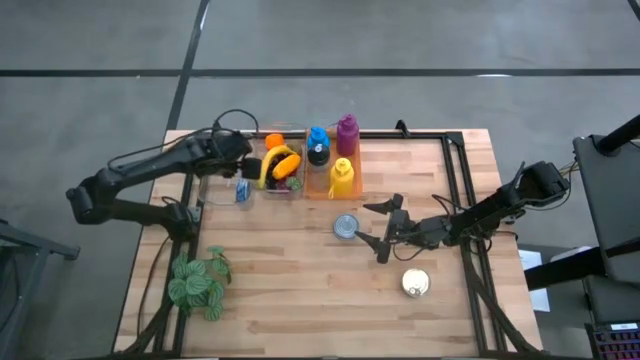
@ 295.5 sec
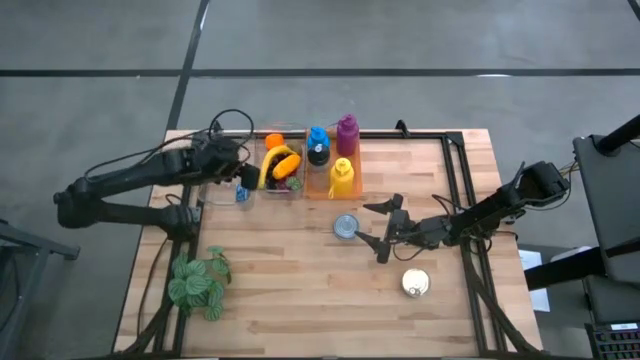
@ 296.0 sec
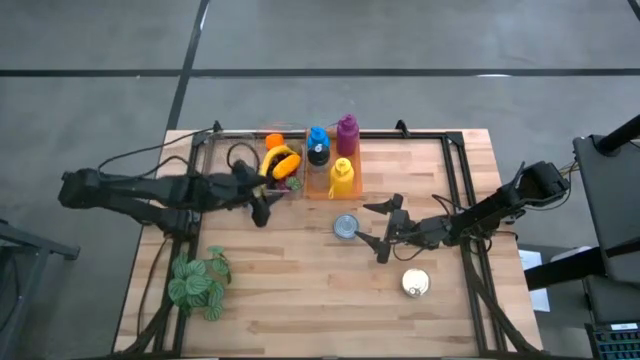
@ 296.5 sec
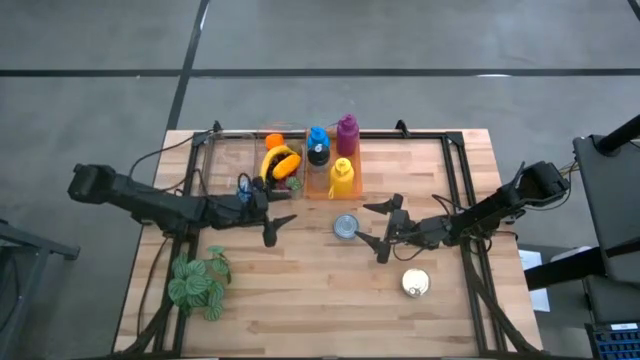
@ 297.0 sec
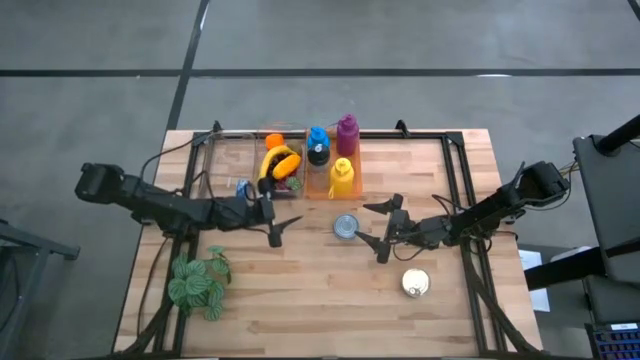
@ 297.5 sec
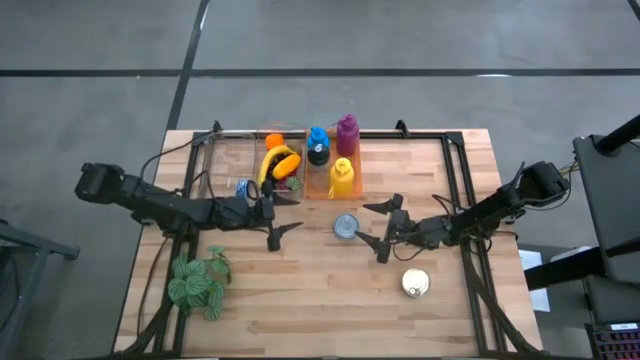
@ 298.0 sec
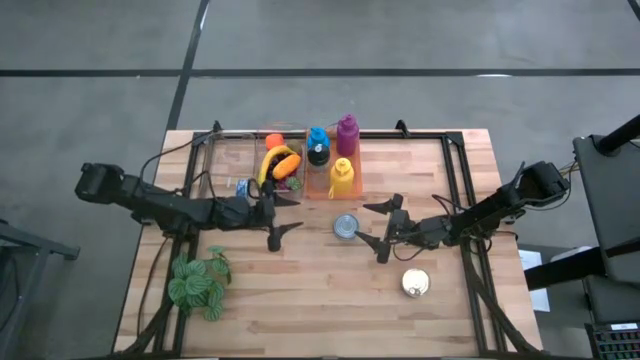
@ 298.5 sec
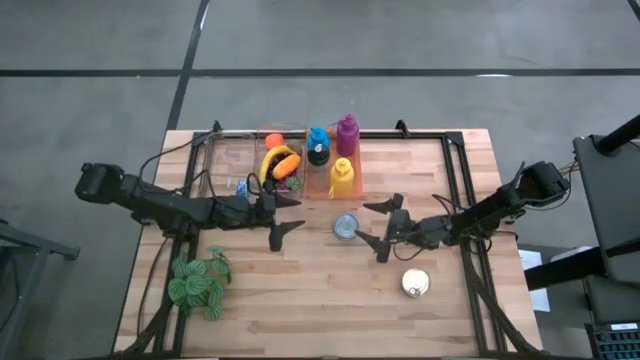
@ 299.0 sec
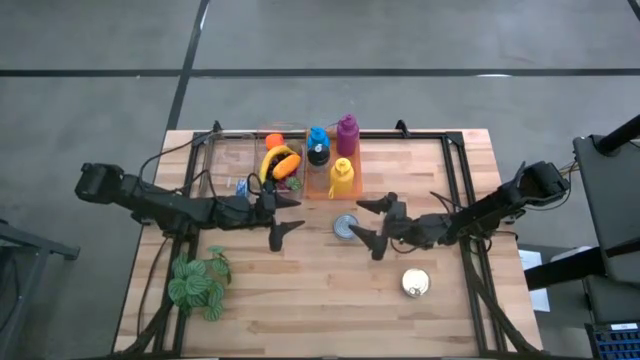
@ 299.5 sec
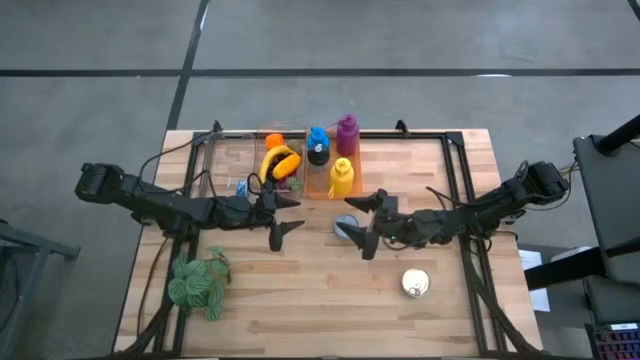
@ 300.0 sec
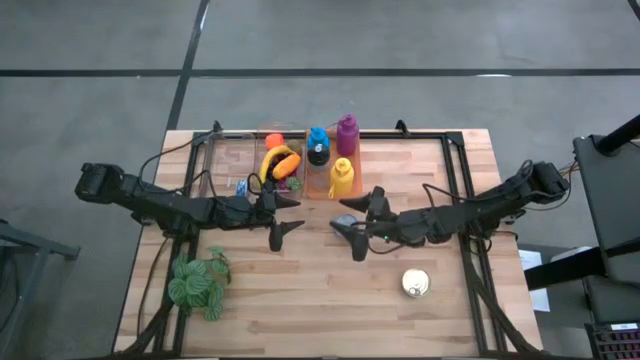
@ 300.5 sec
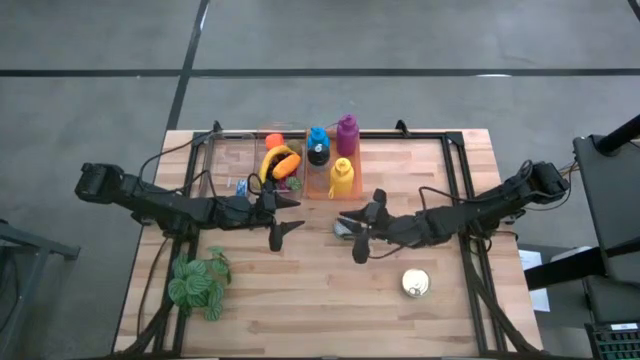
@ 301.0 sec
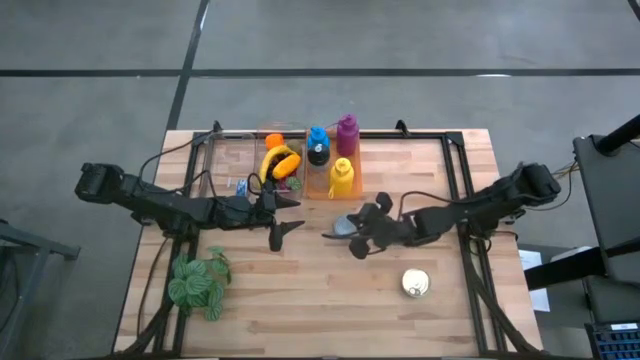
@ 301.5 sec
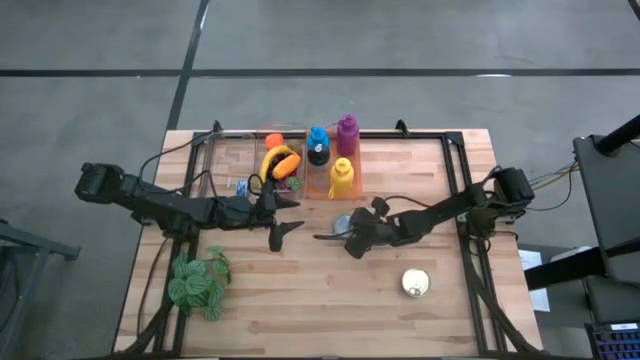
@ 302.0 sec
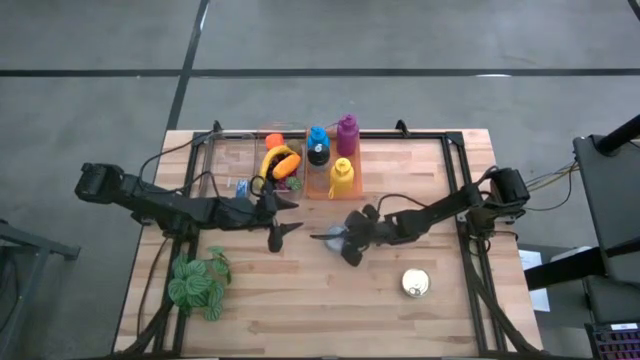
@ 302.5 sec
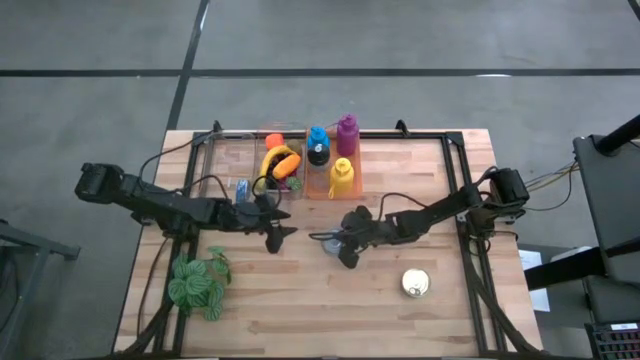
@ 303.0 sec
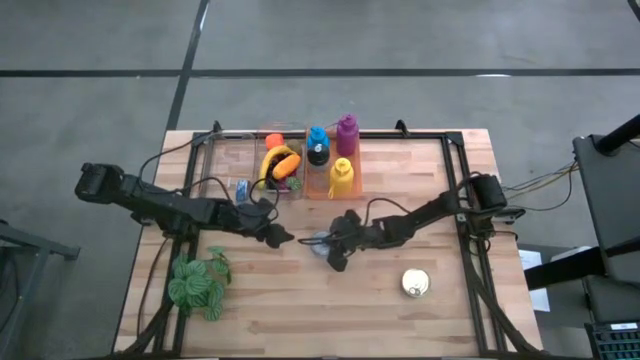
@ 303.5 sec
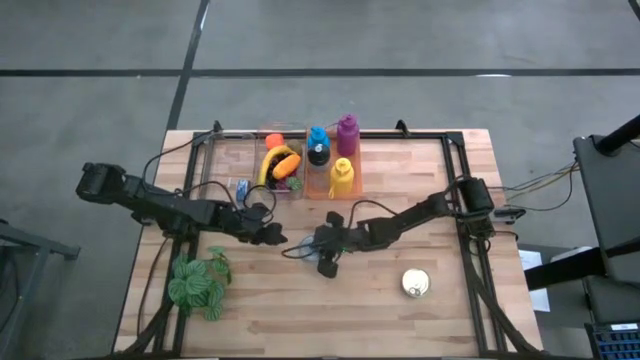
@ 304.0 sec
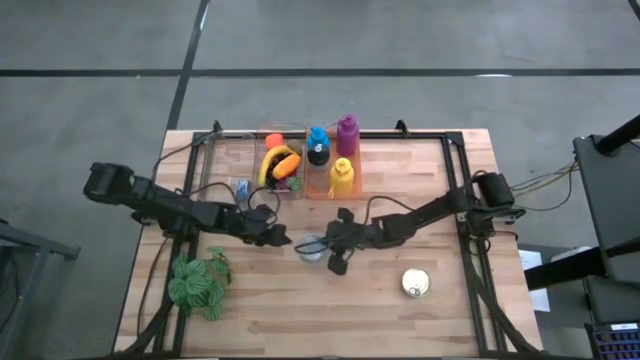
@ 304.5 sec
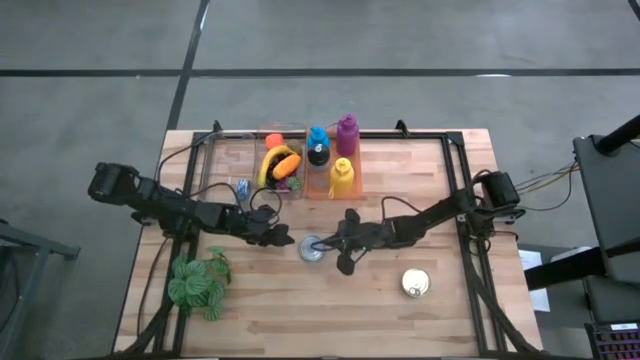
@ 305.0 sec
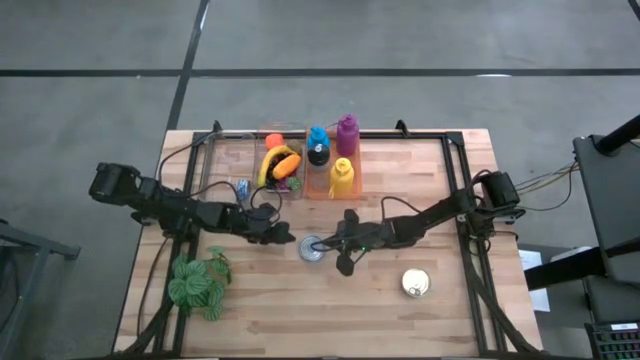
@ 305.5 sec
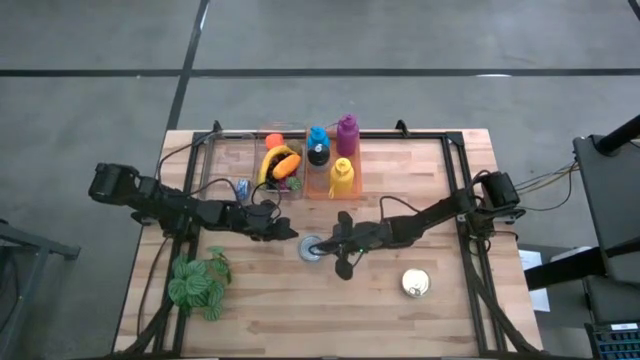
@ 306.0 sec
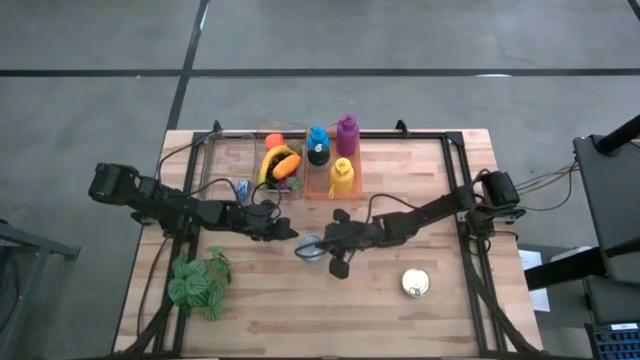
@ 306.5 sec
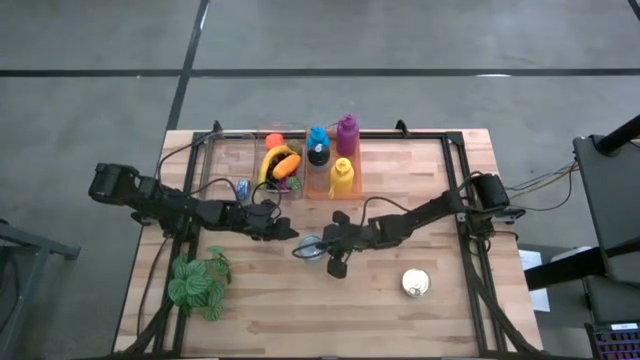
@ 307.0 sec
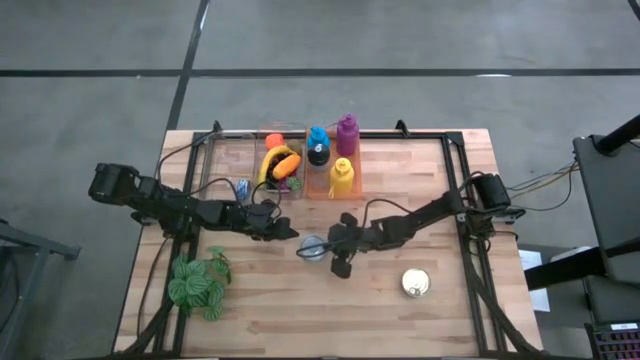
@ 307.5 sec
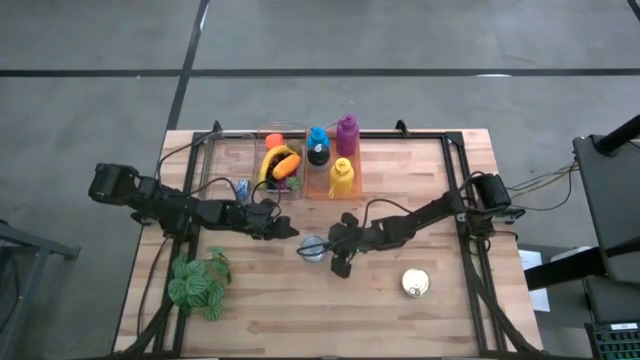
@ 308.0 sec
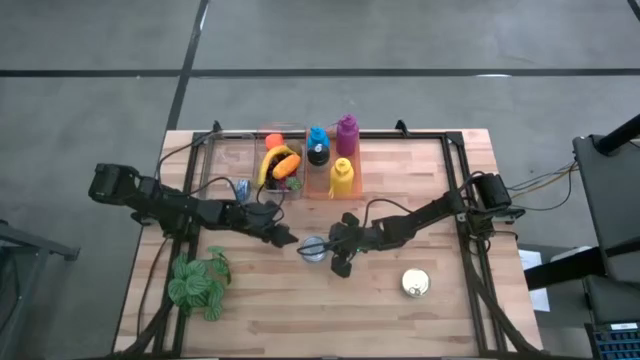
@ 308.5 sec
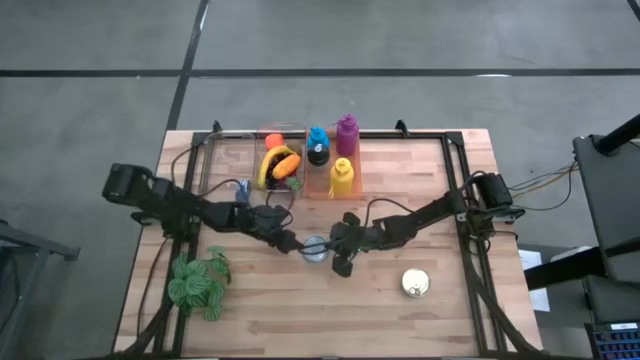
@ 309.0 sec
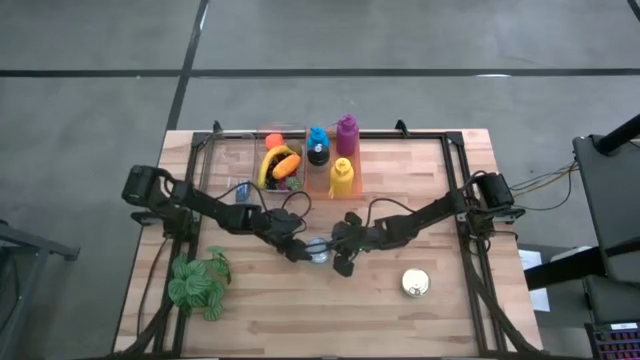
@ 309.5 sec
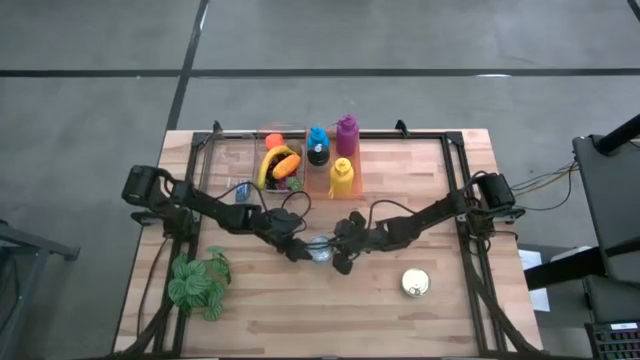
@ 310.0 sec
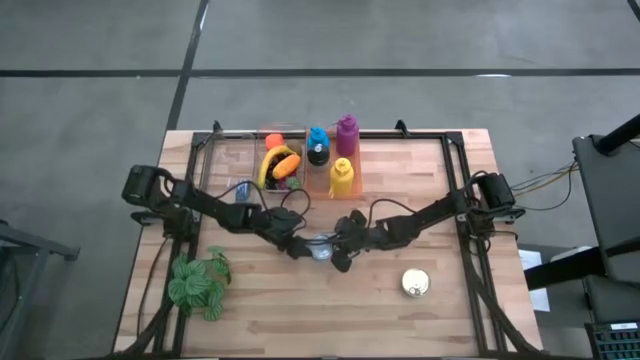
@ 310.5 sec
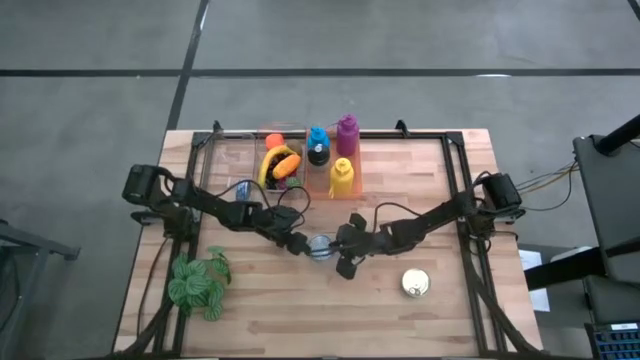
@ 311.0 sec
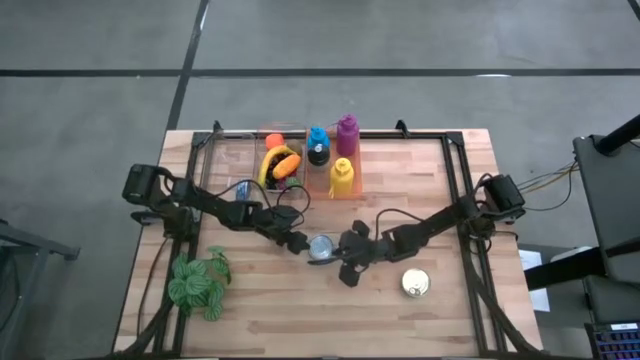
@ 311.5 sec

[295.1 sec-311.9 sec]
Task: Pick & Place Food Item
Put the light blue tuna can into the left transparent bin
